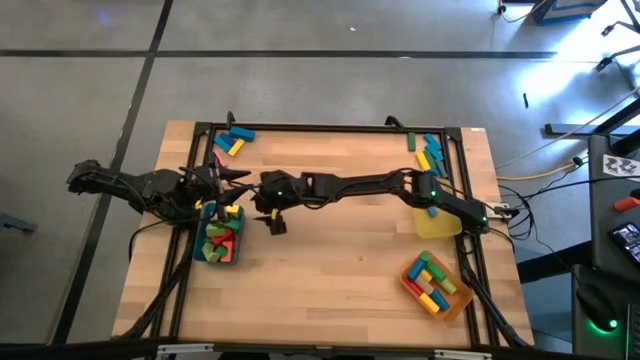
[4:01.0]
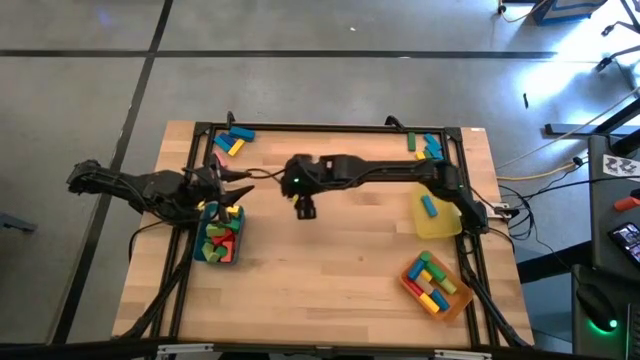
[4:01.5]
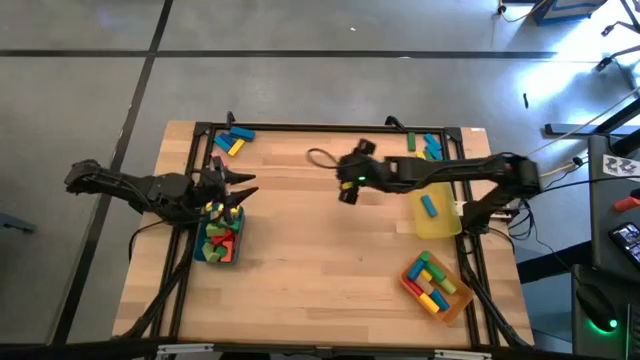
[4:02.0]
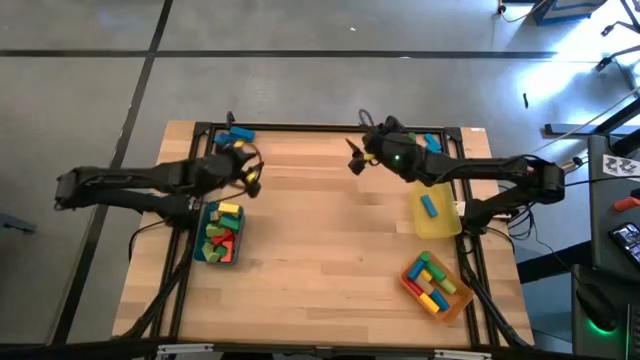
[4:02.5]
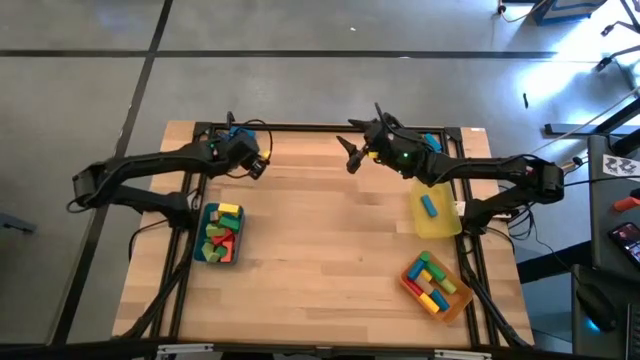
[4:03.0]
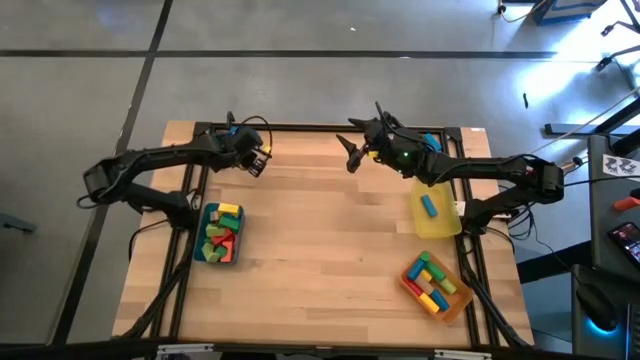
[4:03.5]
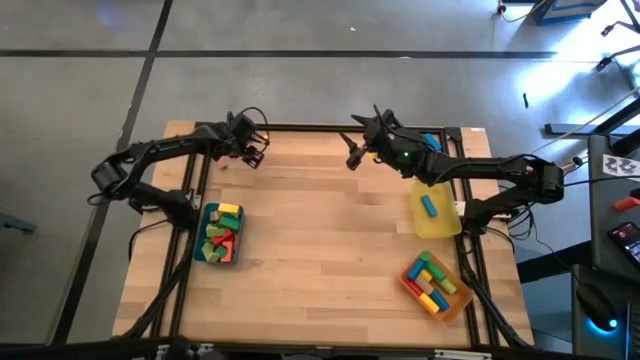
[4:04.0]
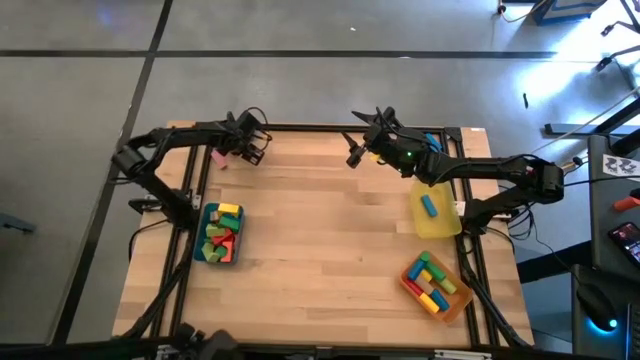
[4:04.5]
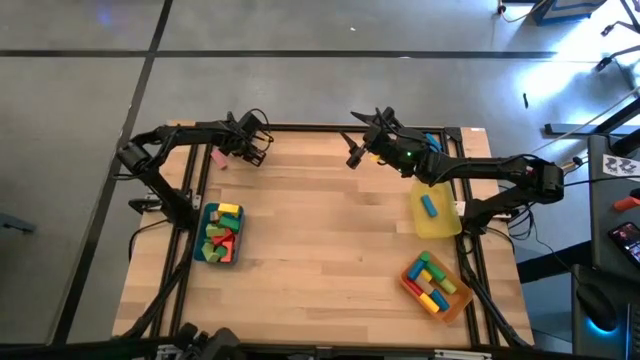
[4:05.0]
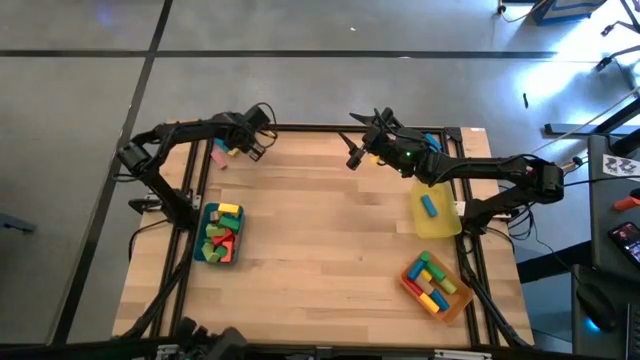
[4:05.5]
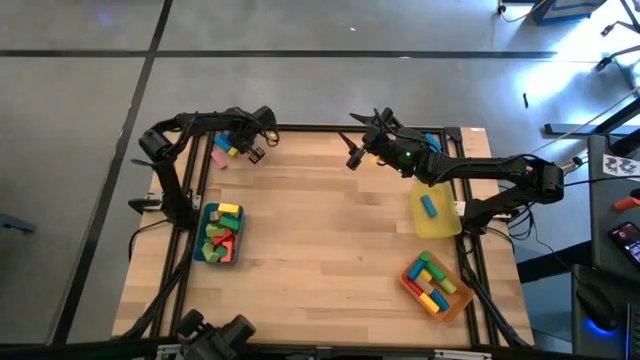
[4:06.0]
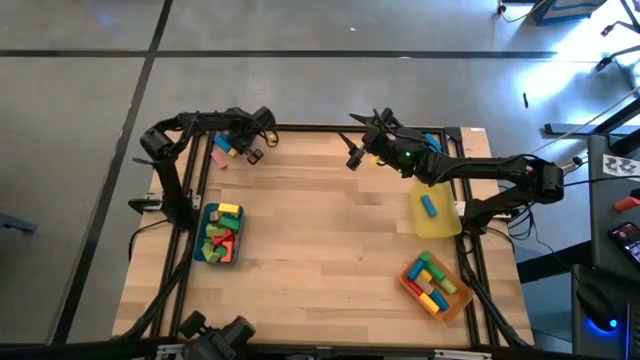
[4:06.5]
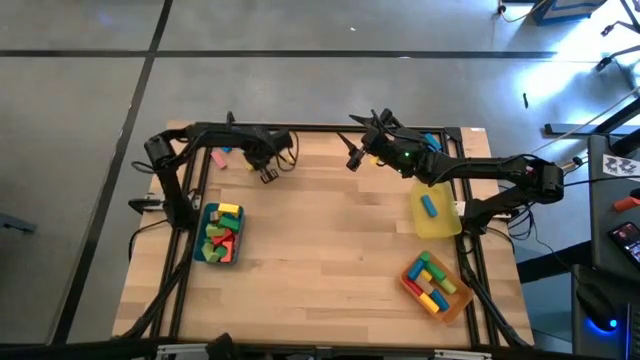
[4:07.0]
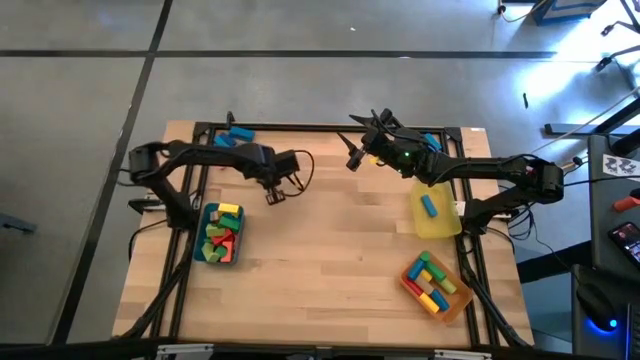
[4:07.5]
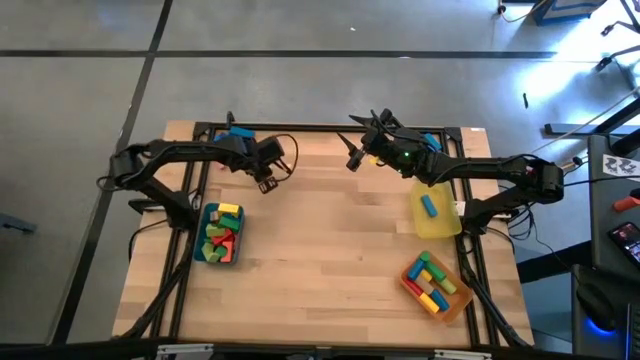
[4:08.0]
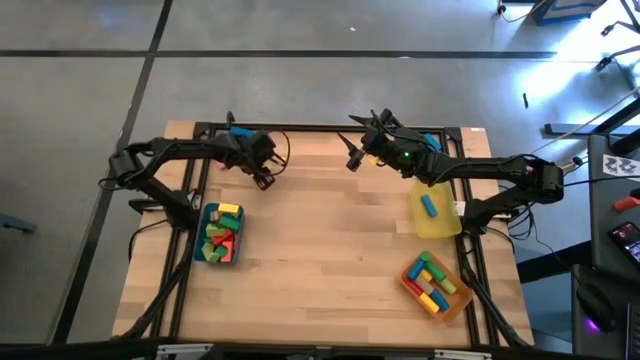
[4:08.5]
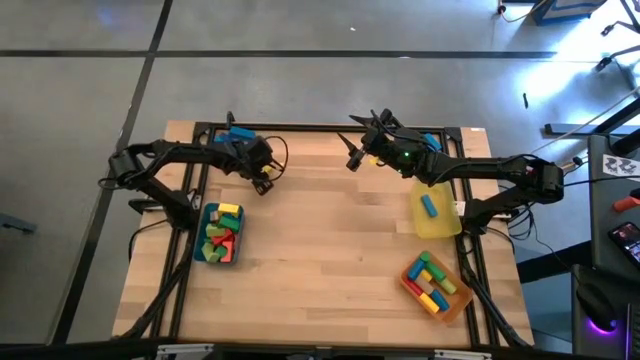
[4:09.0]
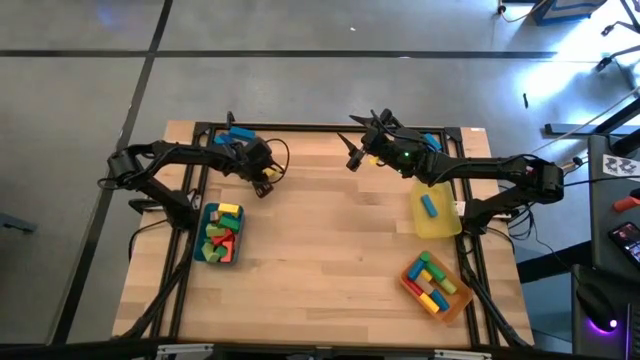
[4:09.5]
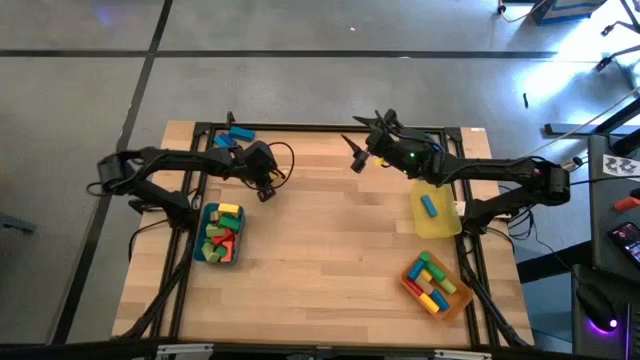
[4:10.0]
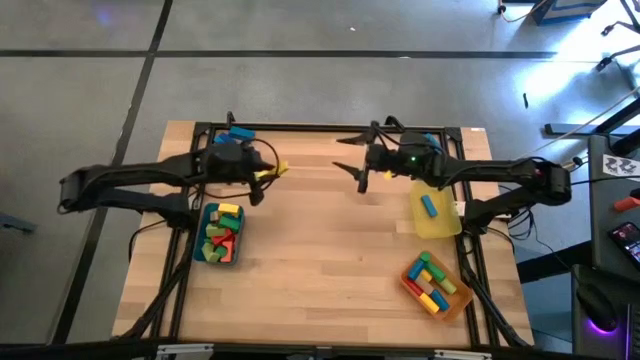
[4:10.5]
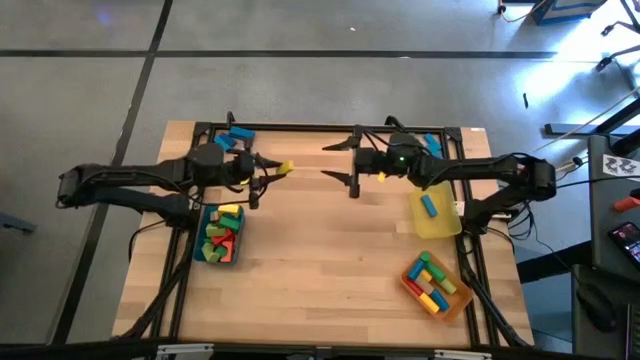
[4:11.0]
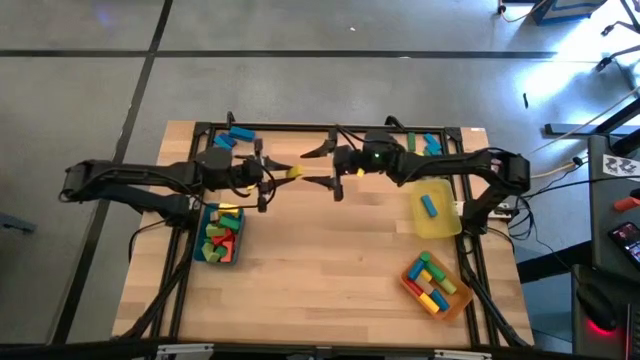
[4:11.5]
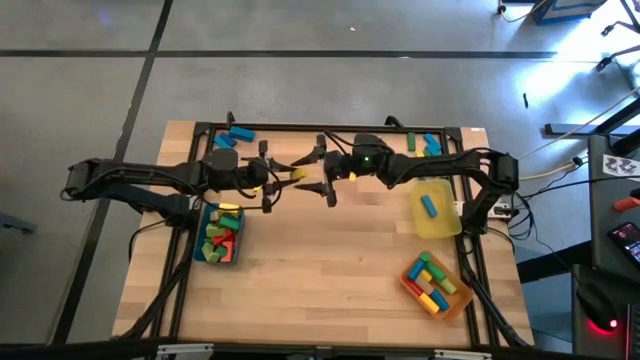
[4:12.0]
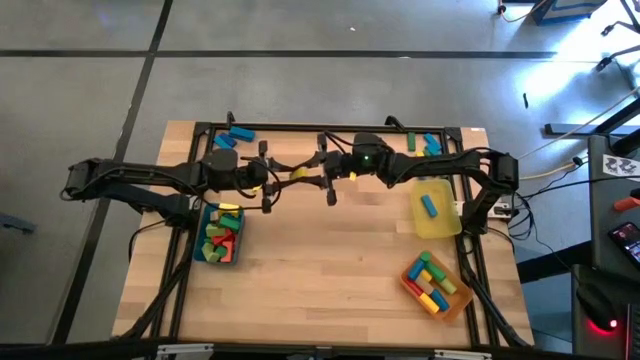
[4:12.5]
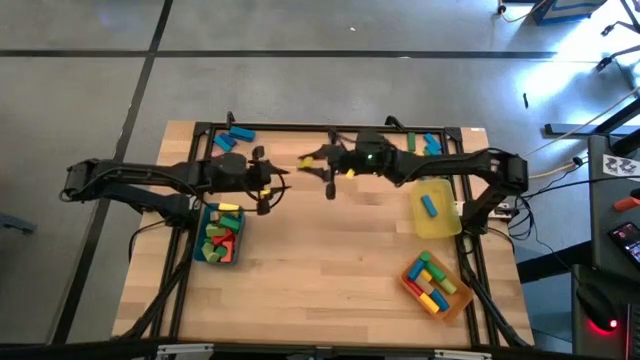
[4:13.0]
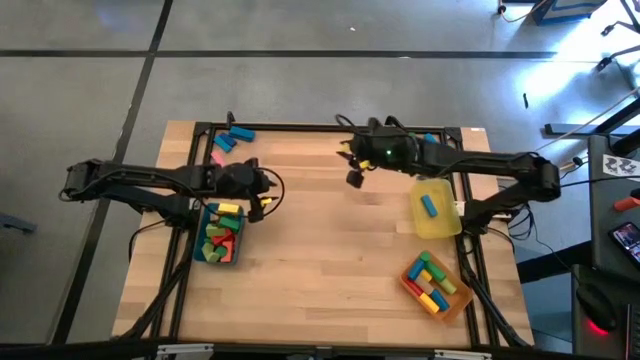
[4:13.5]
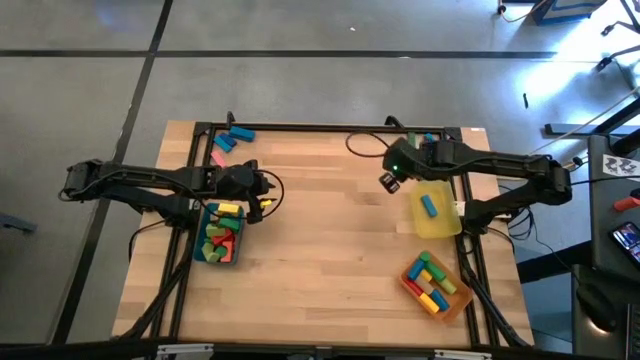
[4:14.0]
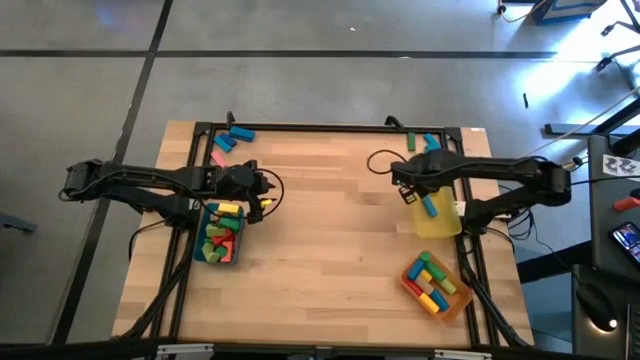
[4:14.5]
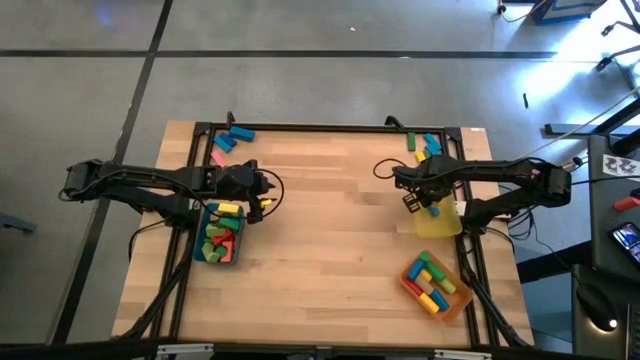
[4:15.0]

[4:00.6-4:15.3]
Task: Sort blocks by size
Put the yellow rectangular block into the yellow bin

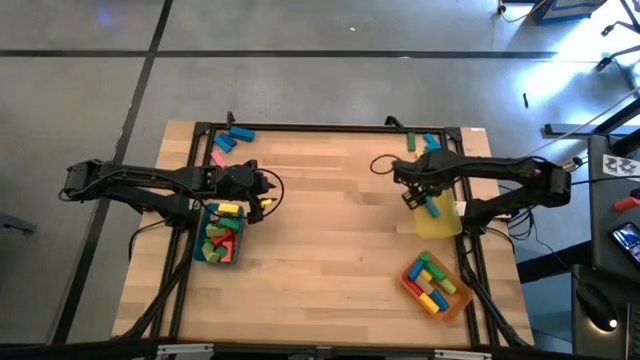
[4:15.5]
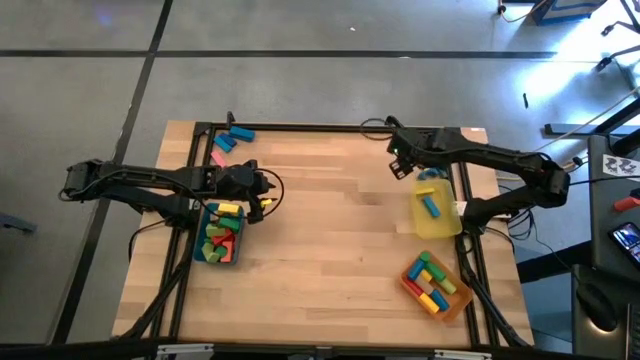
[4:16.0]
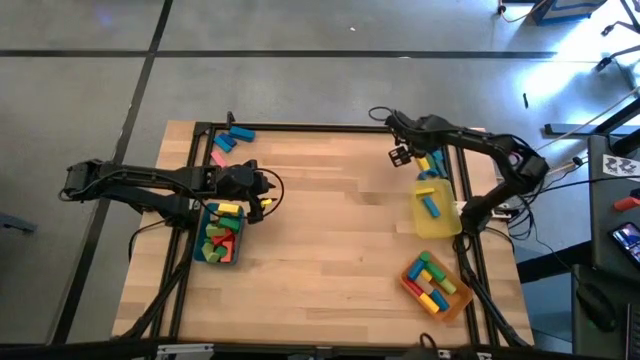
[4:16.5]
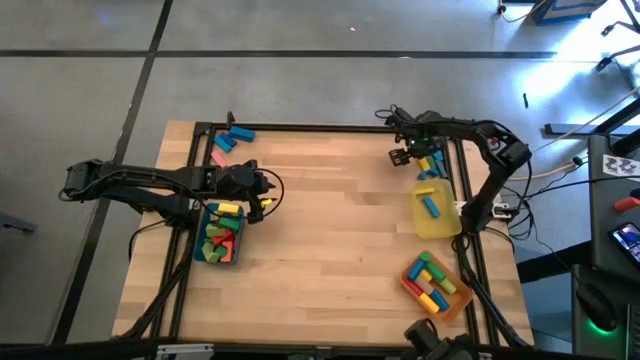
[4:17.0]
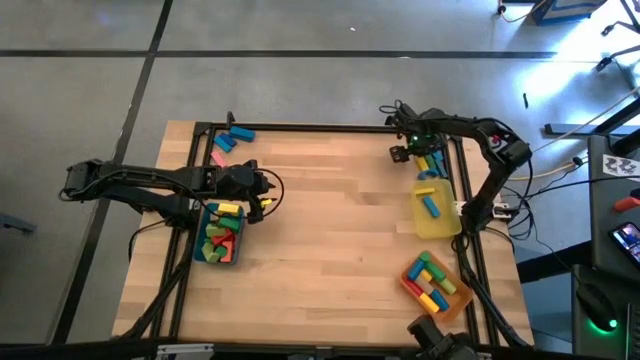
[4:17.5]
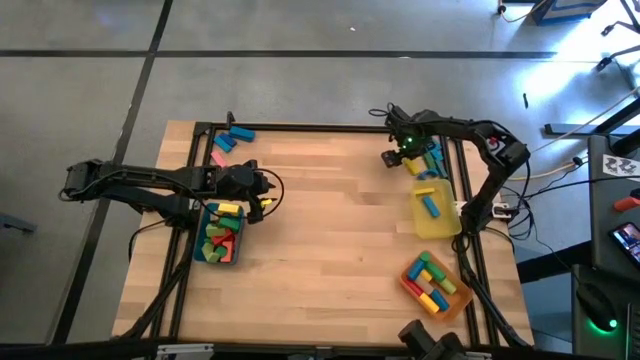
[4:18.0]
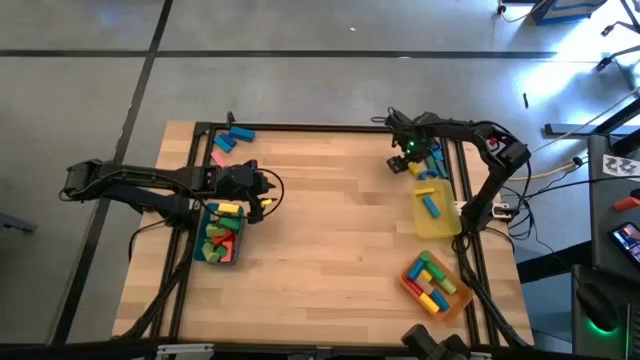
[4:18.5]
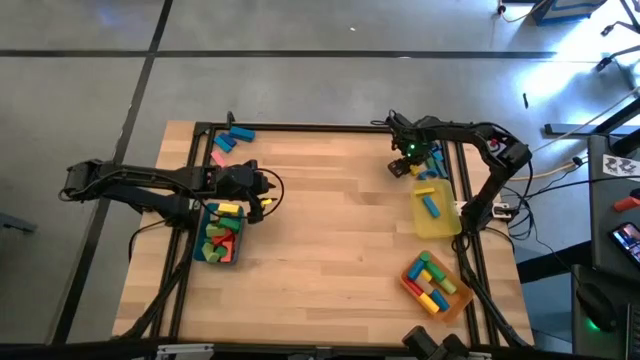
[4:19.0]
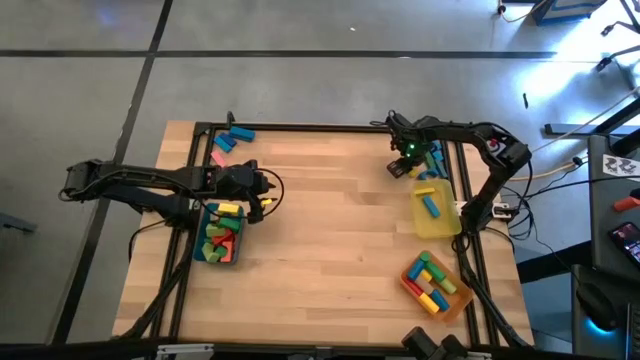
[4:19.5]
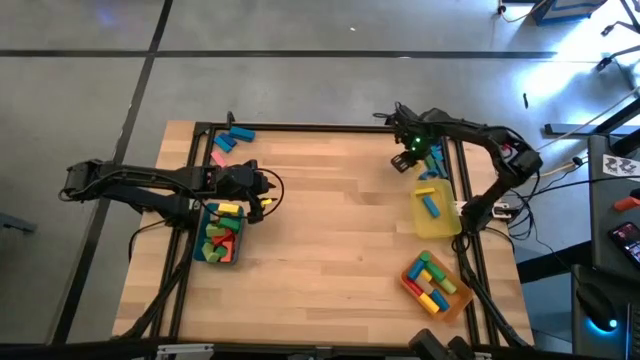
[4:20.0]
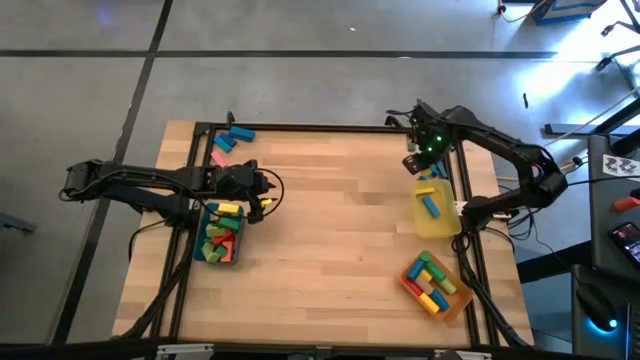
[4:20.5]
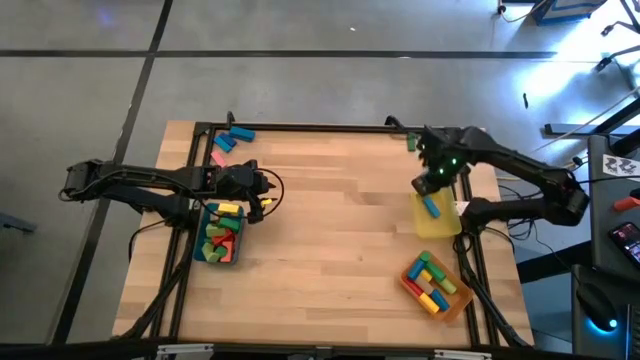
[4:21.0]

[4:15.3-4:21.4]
Put the yellow rectangular block into the yellow bin

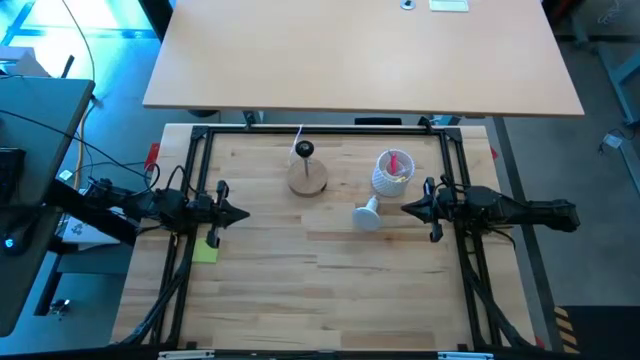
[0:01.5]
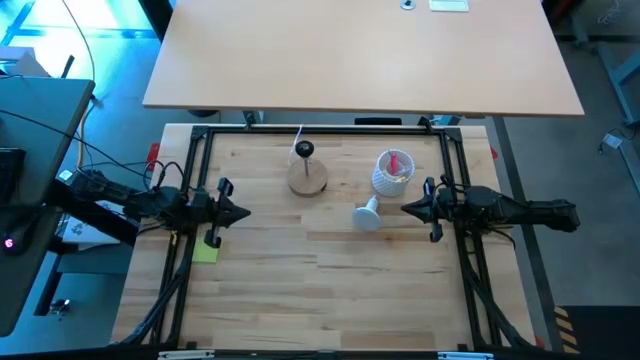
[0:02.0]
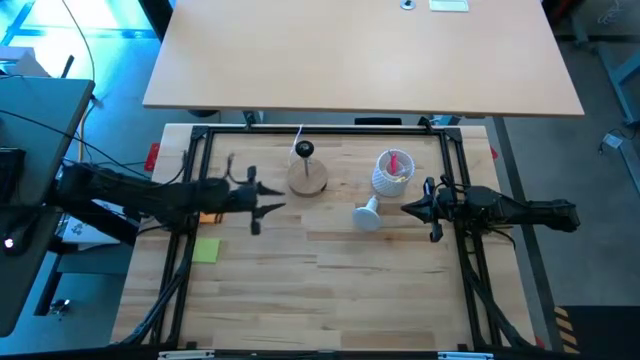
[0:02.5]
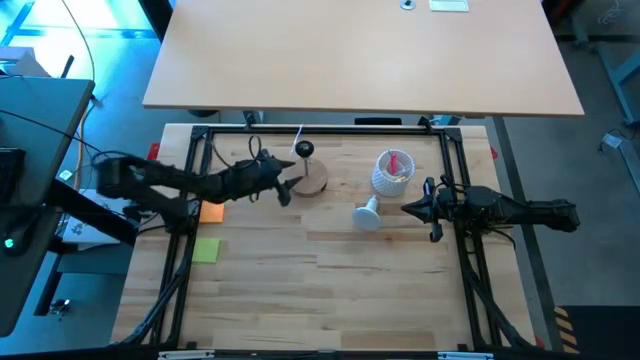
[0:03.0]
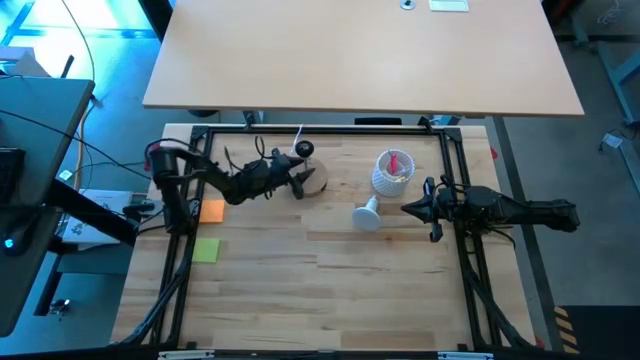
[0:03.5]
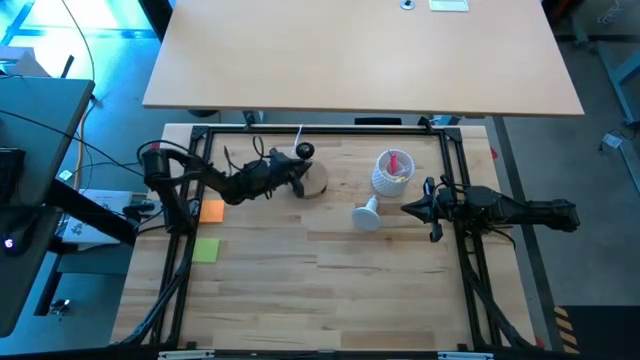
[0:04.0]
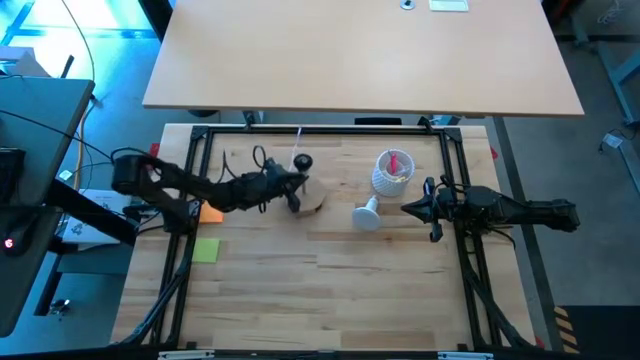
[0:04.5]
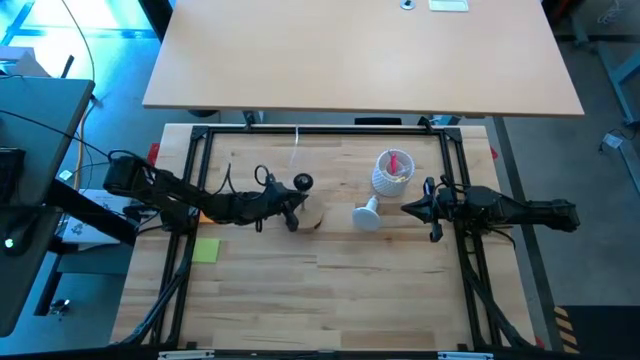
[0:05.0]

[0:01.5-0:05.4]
Task: Screw lightbulb
Move the lamp to the center of the table
